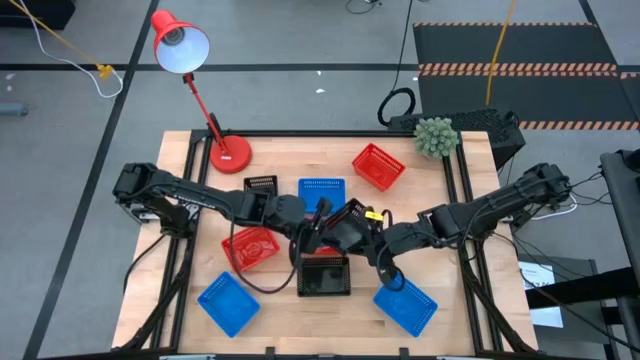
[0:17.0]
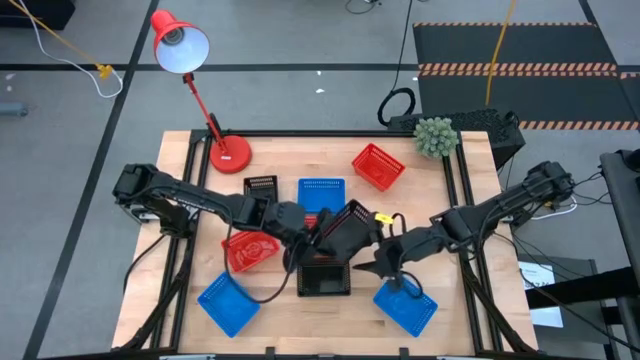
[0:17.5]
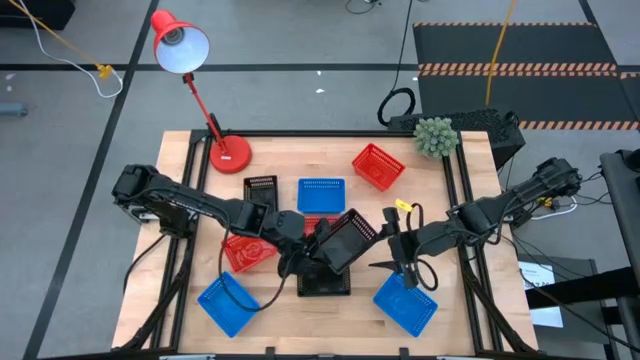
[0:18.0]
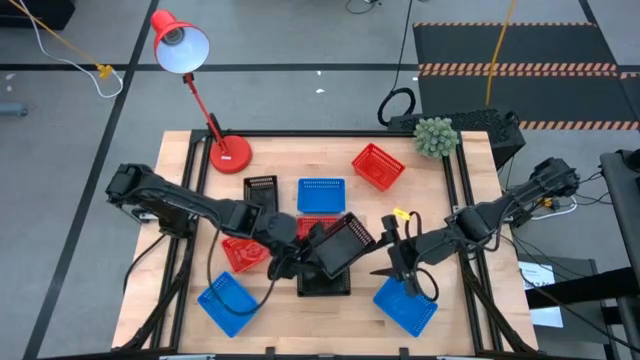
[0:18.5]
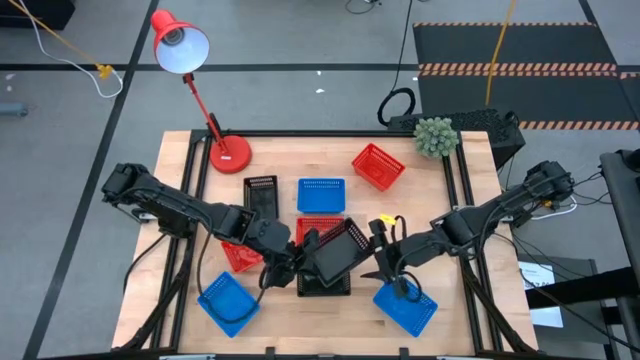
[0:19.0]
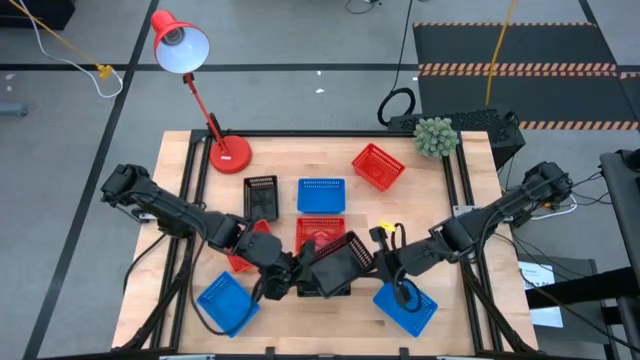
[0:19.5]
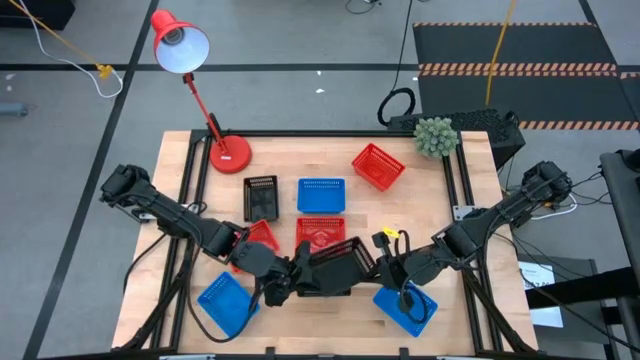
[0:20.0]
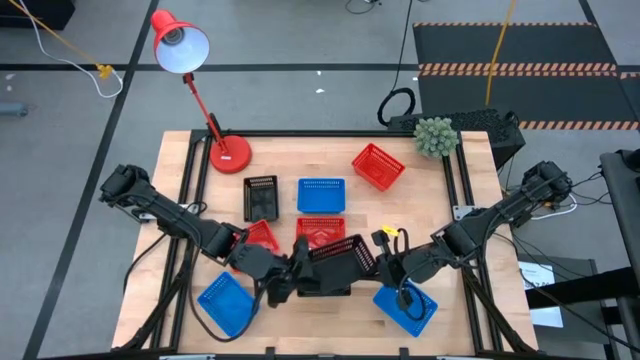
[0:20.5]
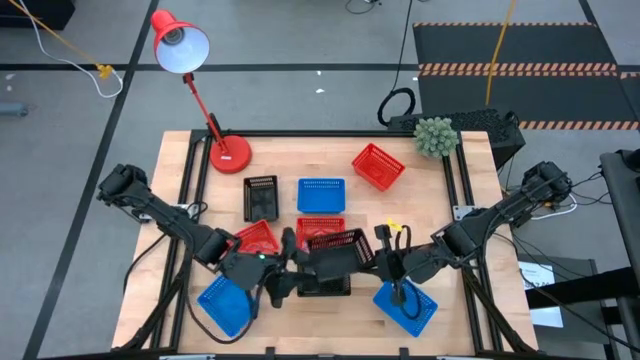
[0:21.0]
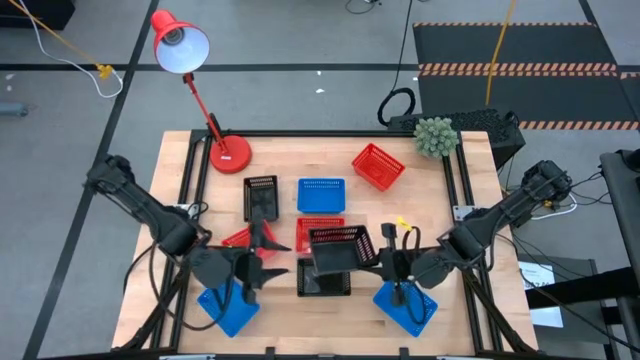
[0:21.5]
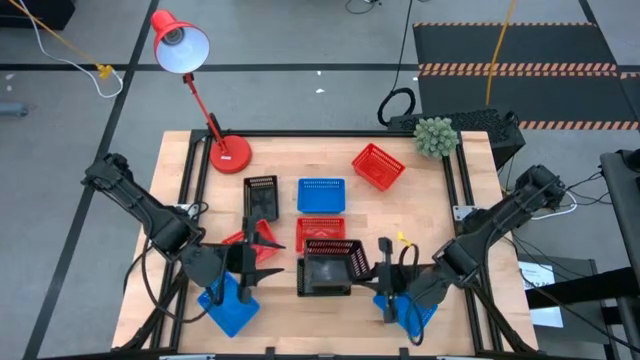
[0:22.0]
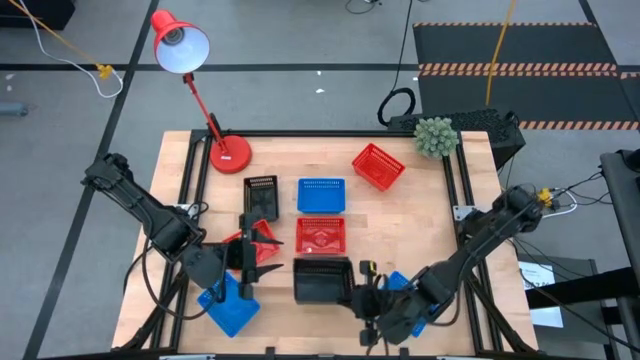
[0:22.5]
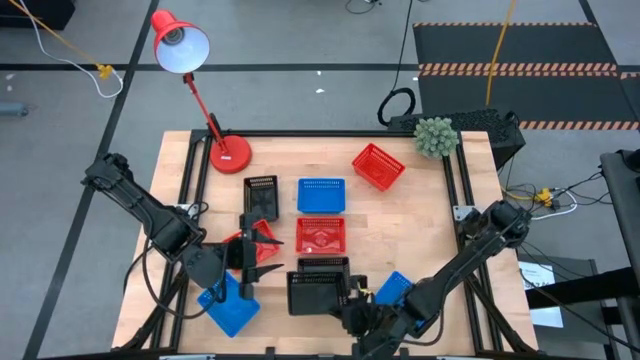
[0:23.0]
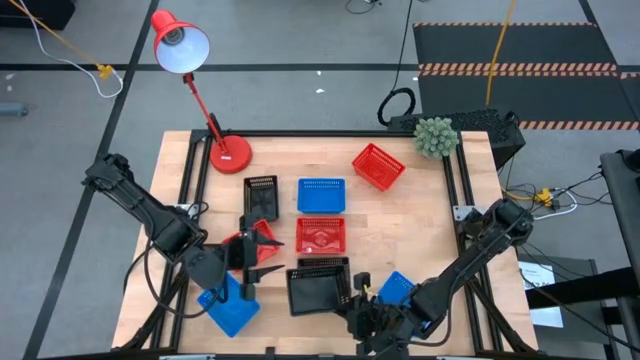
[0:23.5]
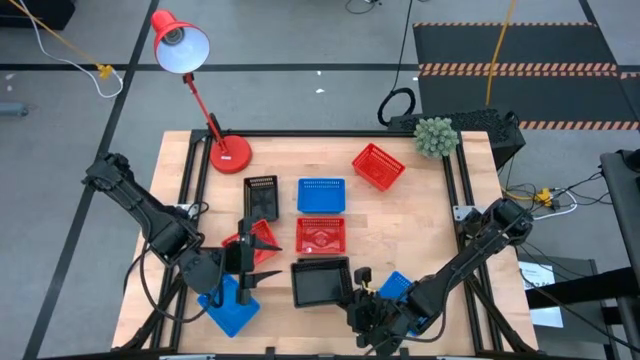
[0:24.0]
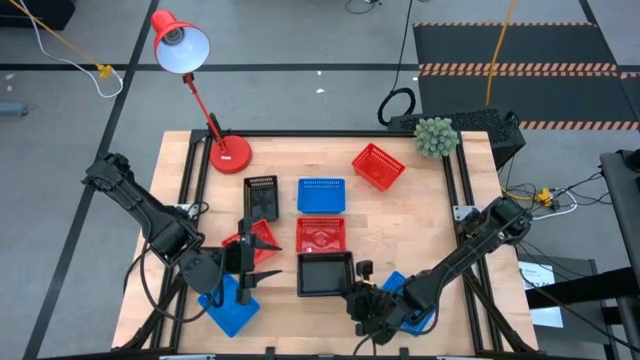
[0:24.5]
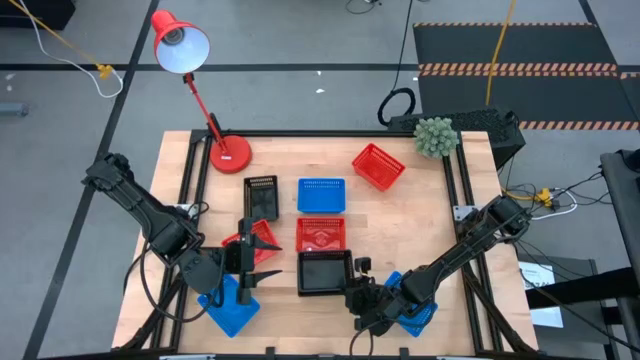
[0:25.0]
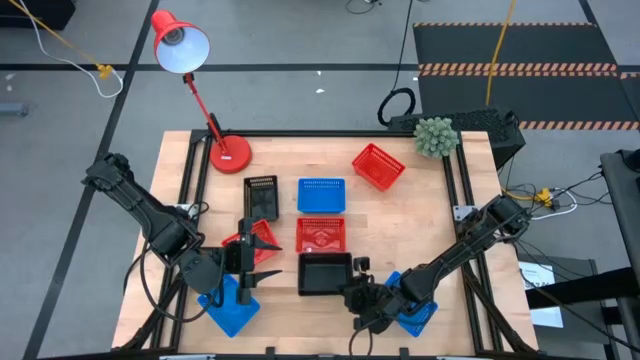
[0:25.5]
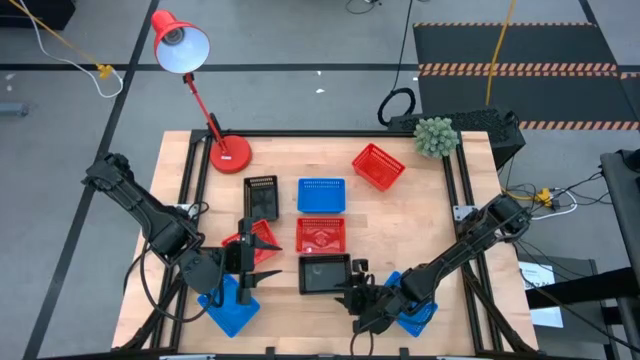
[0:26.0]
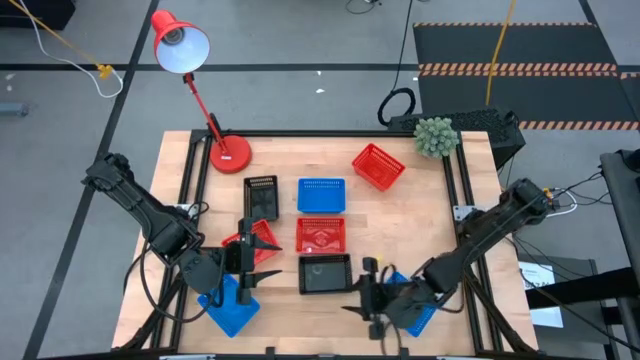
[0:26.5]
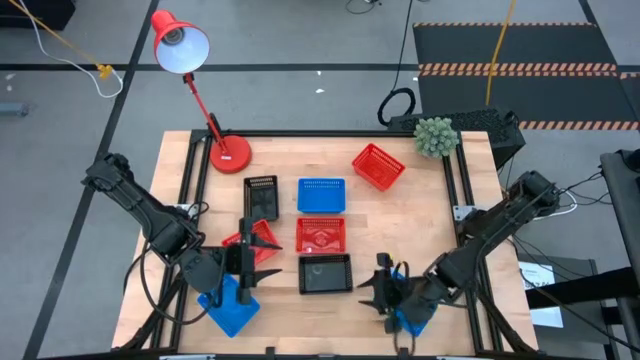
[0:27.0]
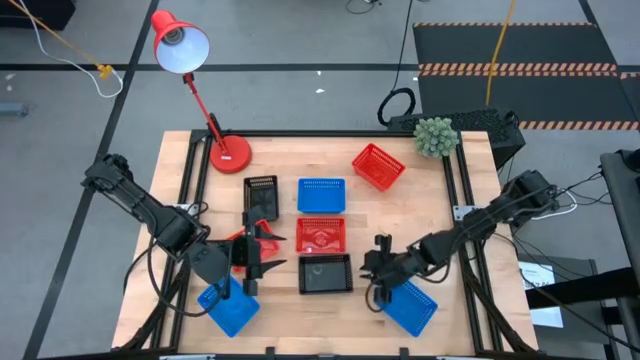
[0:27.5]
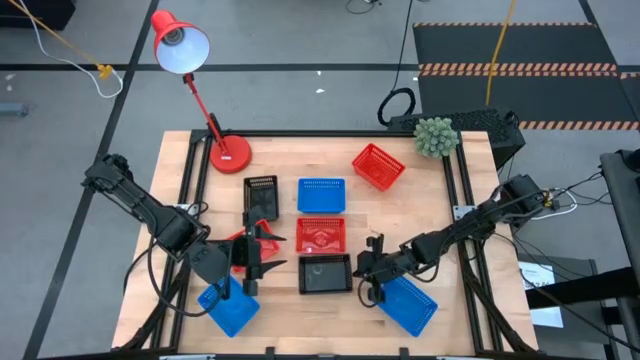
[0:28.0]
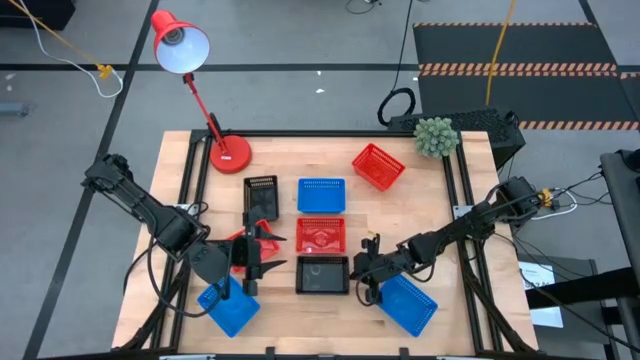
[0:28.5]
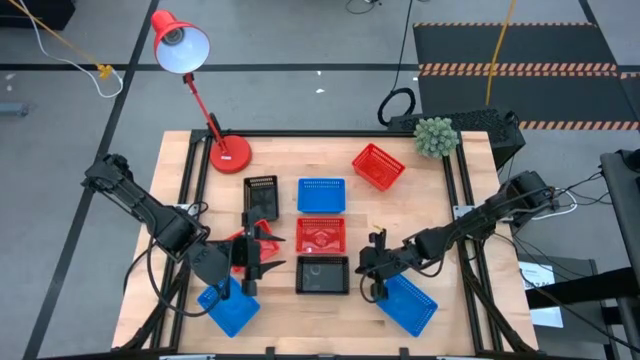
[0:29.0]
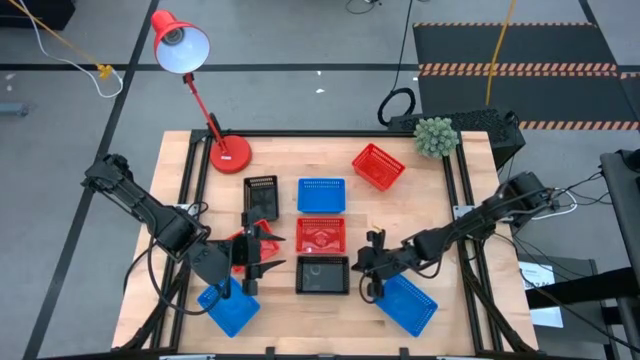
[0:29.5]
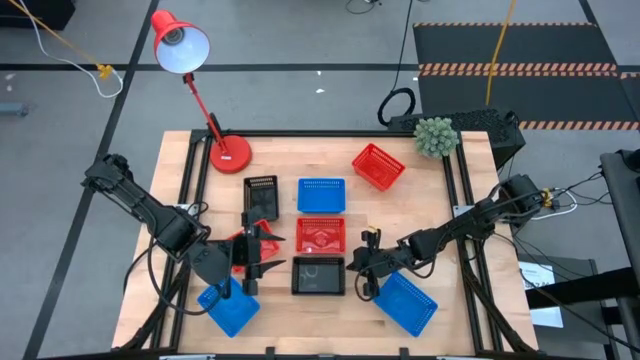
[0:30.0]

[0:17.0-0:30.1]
Stack the top right black bin on the bottom black bin

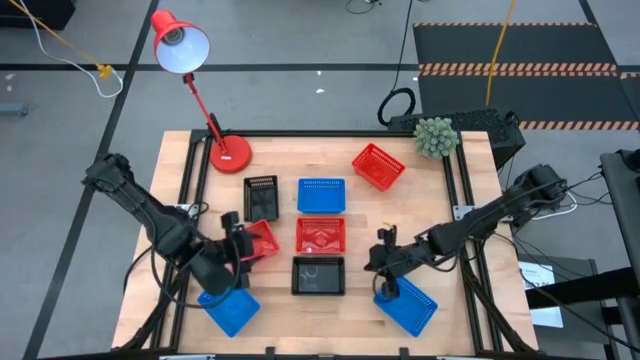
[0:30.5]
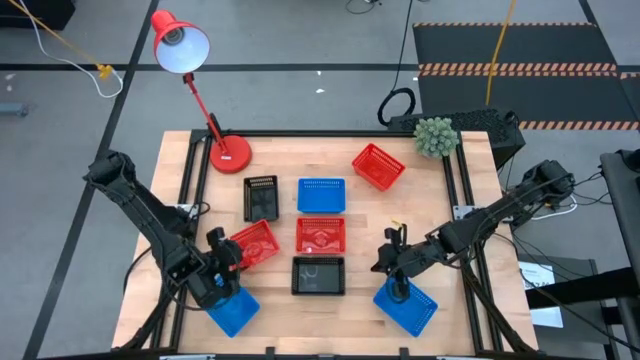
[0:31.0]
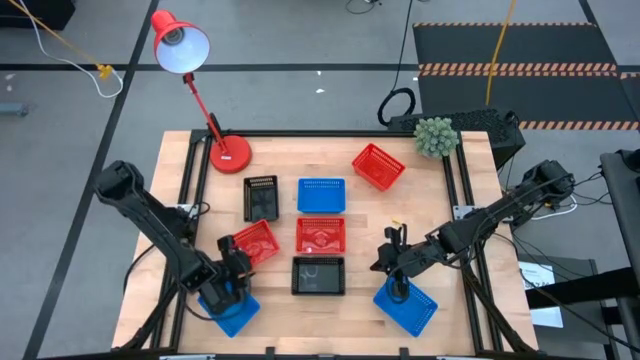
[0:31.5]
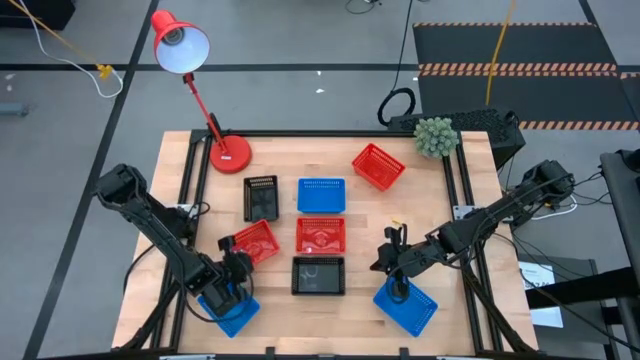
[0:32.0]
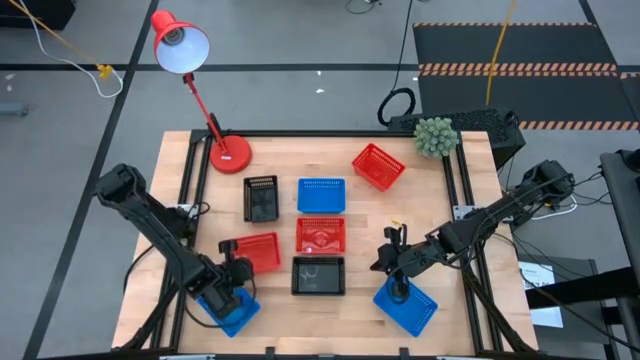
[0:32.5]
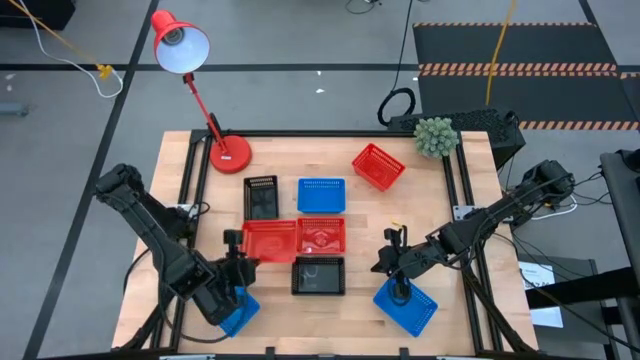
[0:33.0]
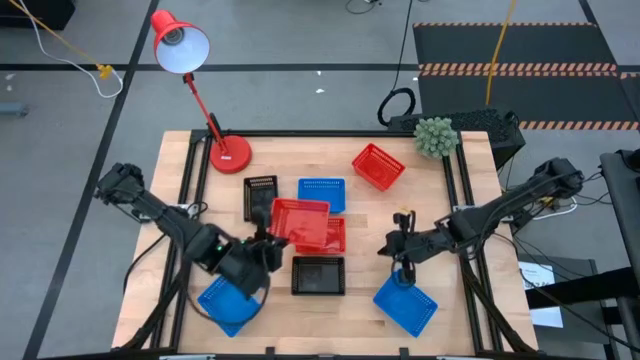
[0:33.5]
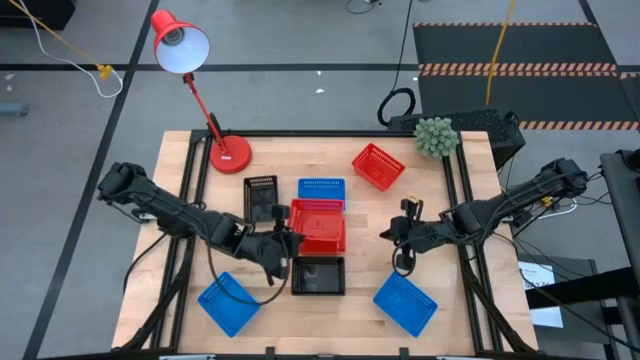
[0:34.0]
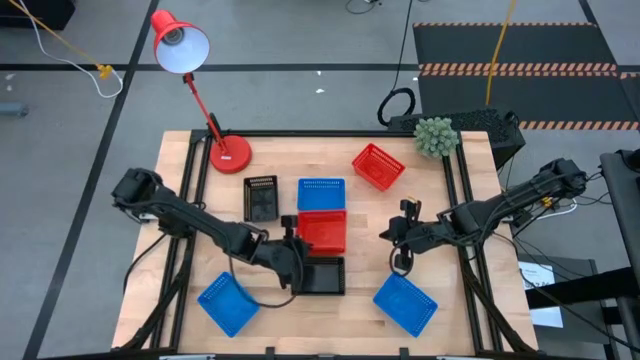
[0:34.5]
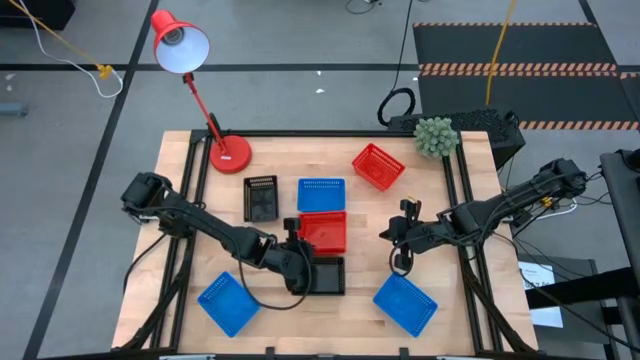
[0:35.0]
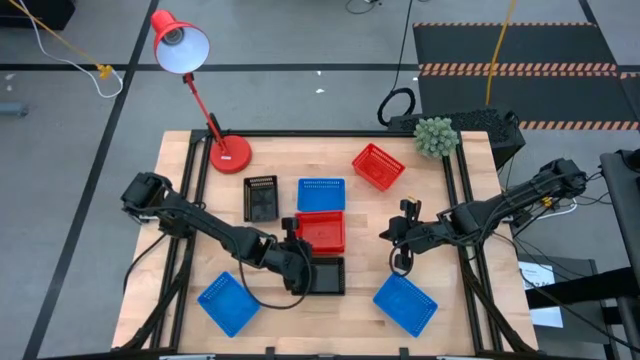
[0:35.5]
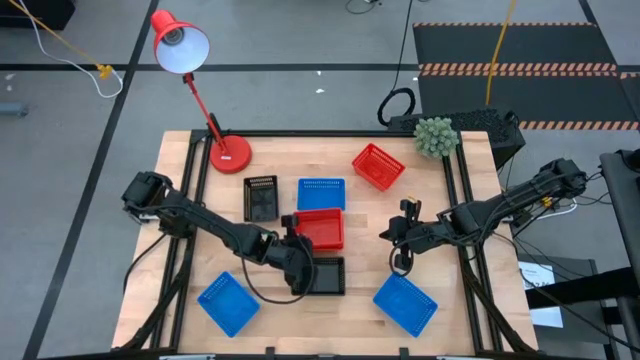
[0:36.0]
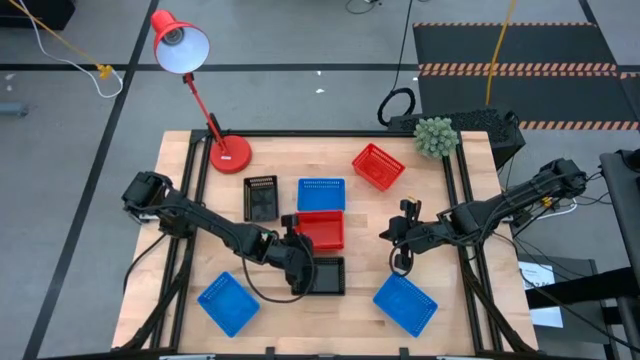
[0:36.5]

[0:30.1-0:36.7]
Stack the bottom left red bin on the center red bin

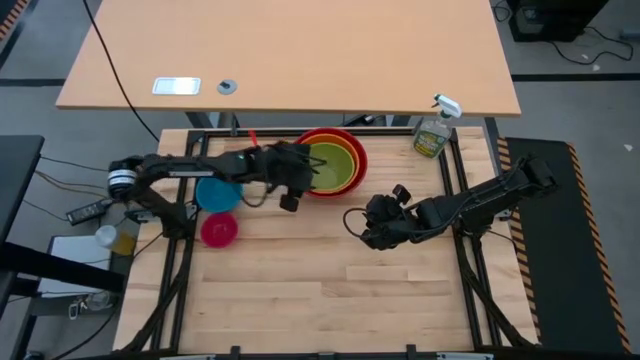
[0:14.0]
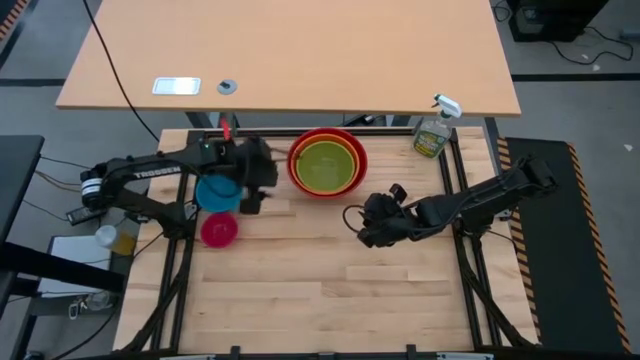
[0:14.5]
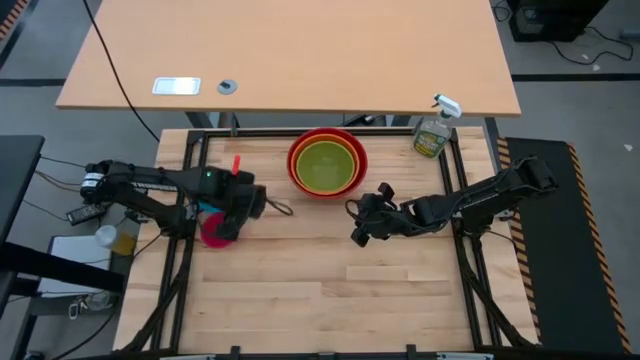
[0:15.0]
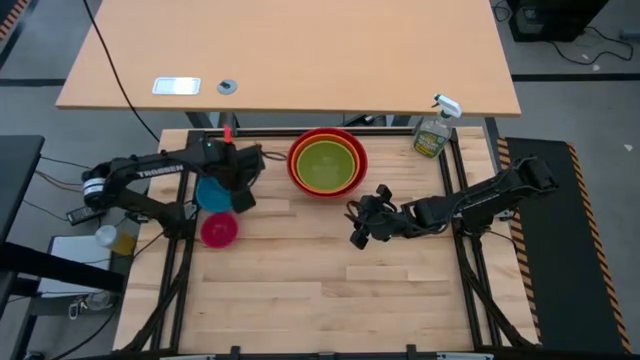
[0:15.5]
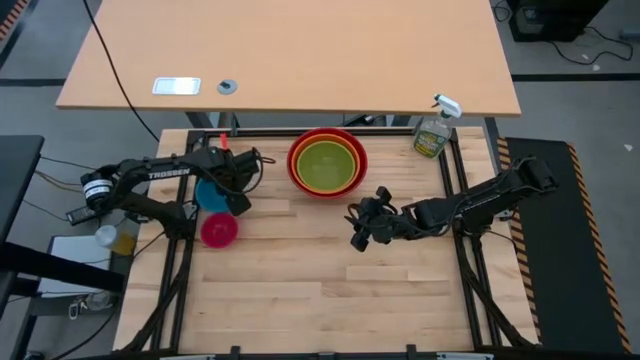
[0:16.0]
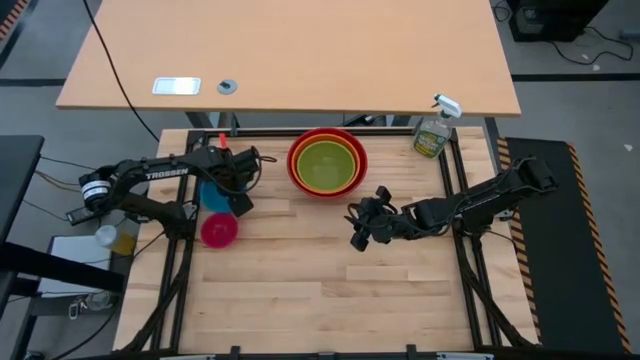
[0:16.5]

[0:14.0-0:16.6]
Stack the blue bowl on top of the green bowl
